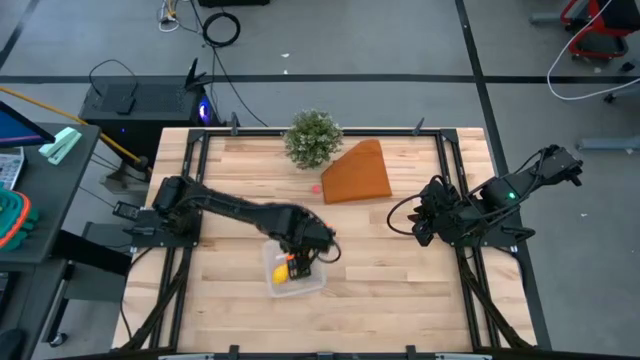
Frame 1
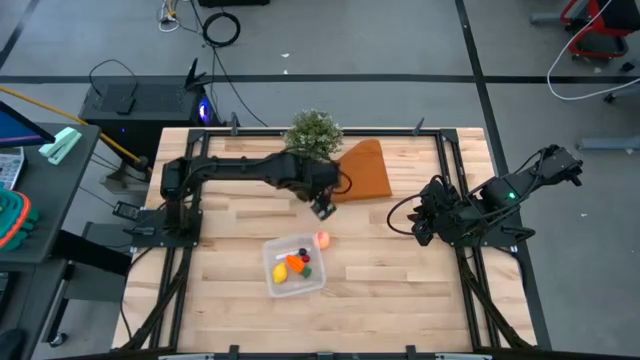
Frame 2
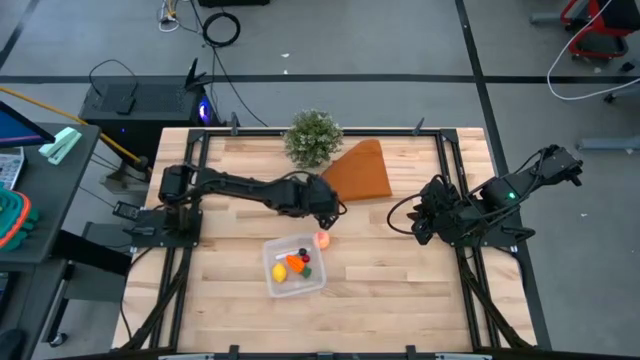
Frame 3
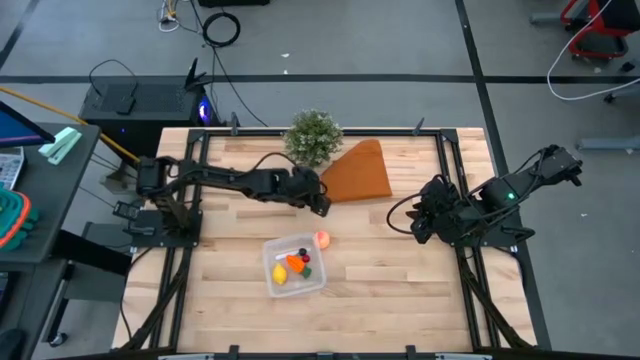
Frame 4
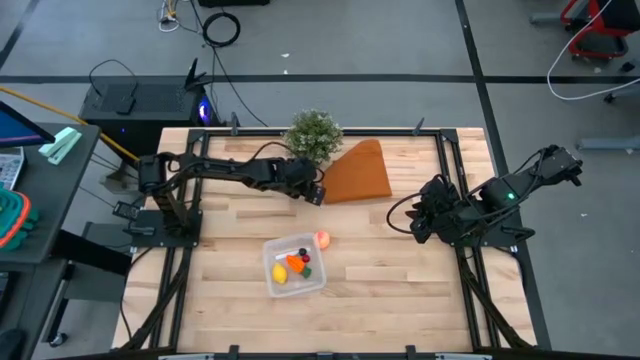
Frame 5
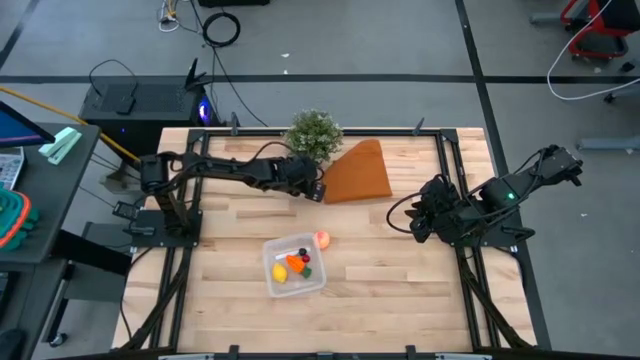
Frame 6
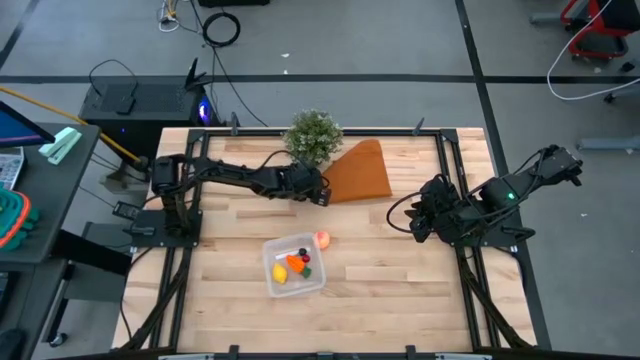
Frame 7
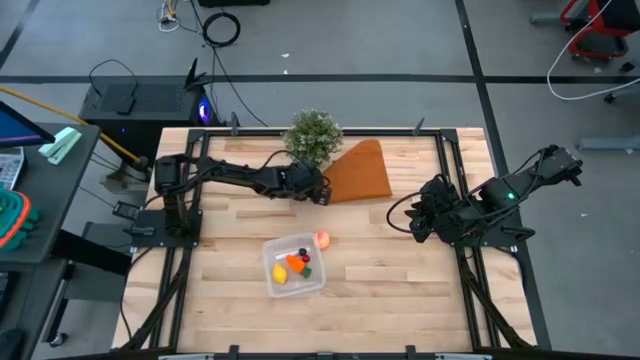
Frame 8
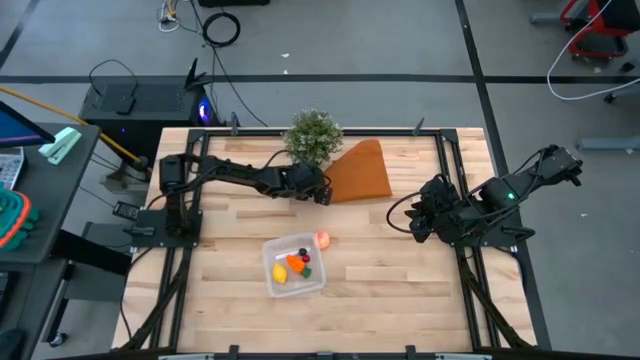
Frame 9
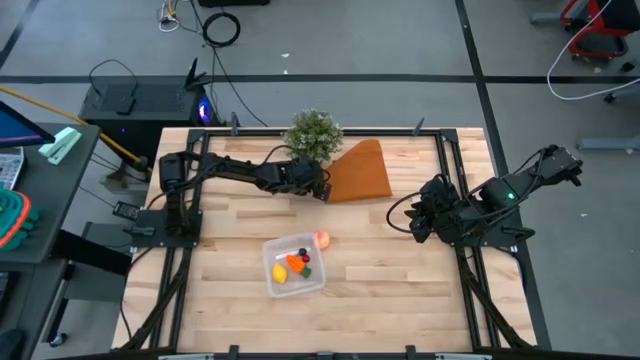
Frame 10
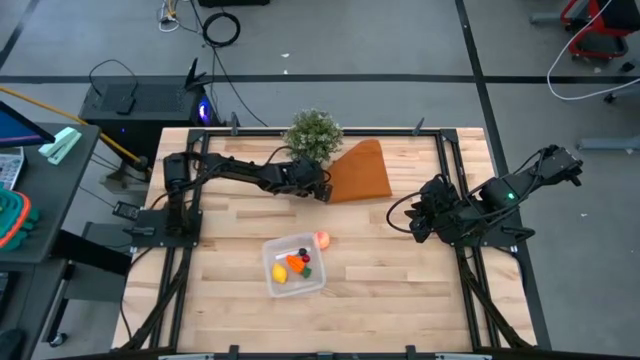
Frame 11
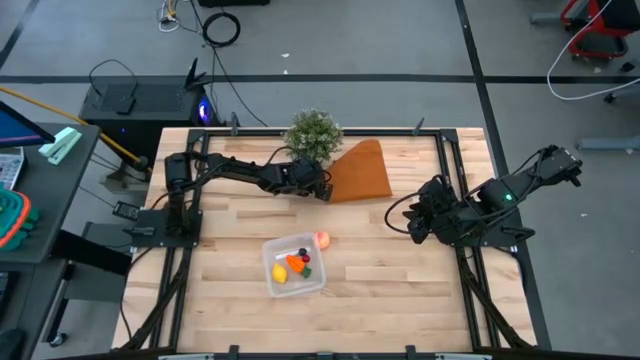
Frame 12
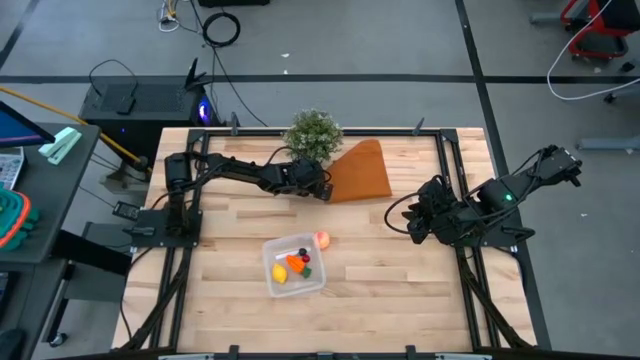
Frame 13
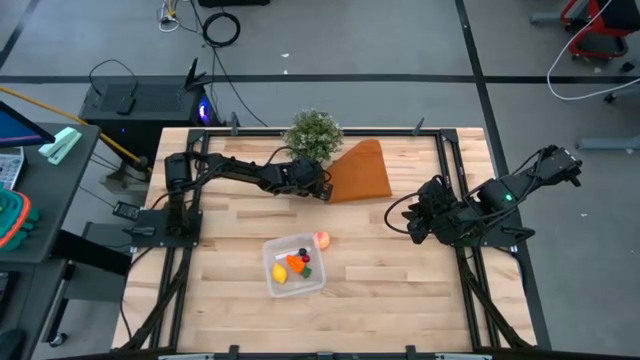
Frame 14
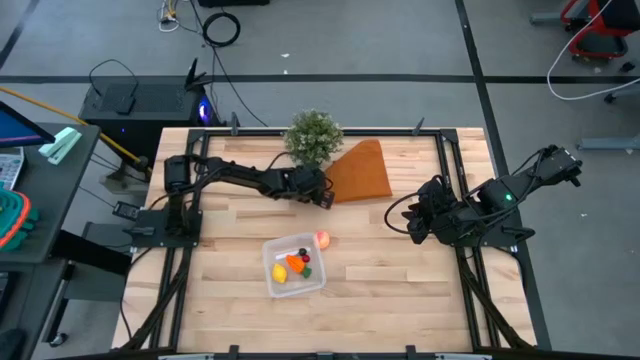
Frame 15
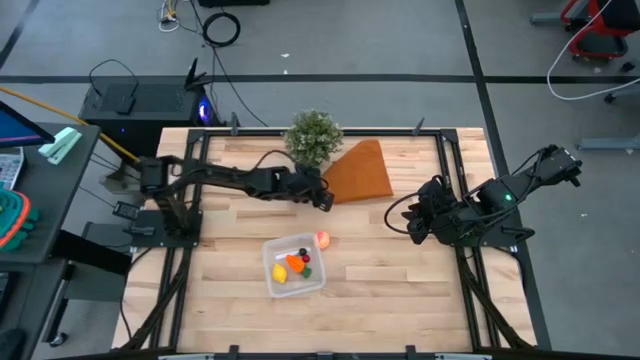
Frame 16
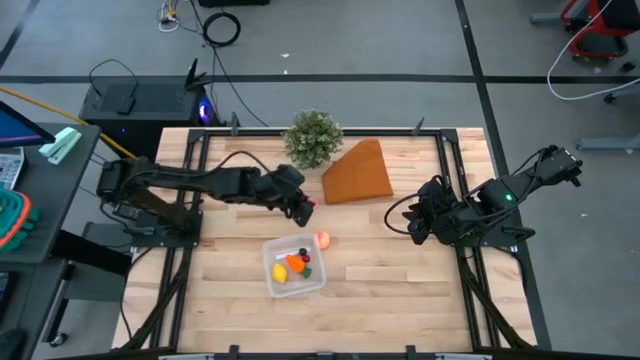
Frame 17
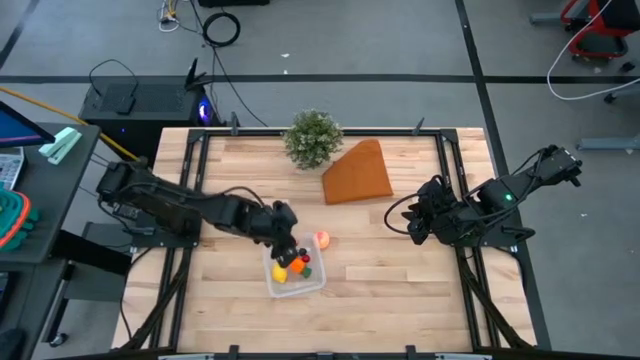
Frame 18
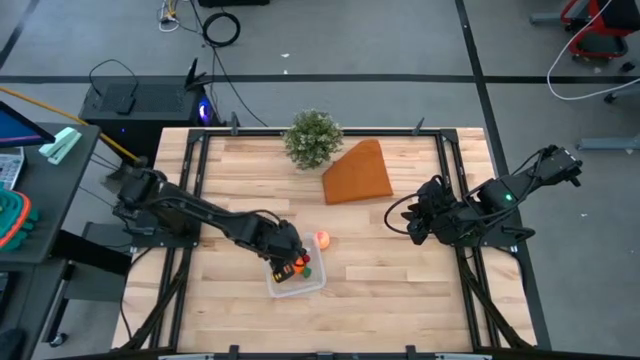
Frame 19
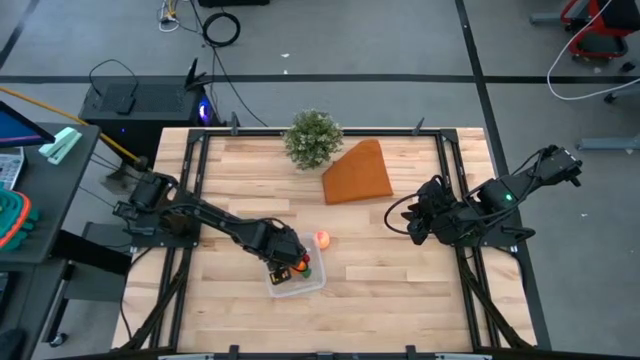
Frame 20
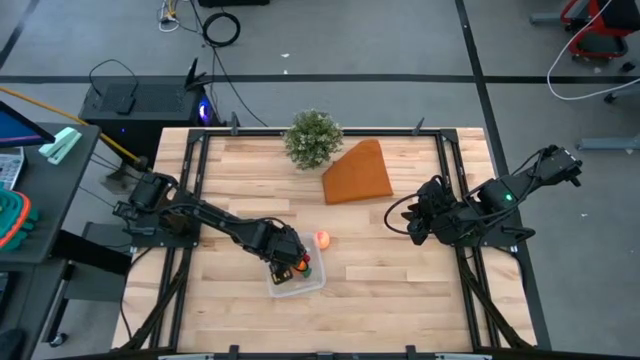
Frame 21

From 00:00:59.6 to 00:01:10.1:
Task: Pick and placing Produce into tupperware
Put the small pink peach into the transparent bin

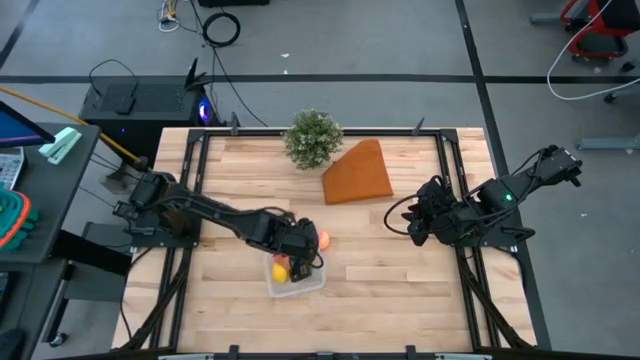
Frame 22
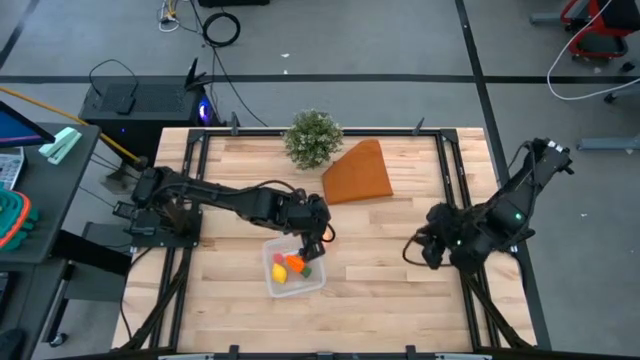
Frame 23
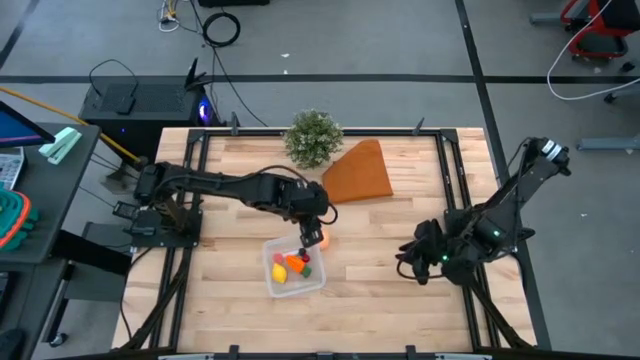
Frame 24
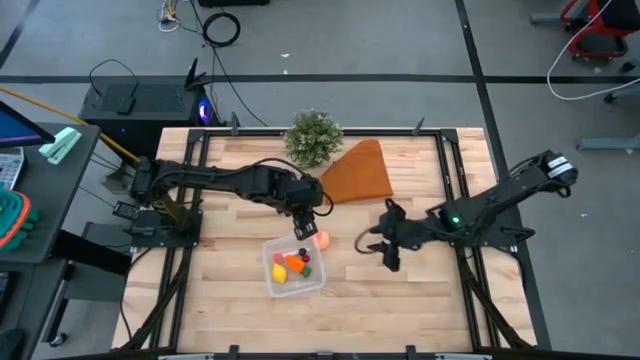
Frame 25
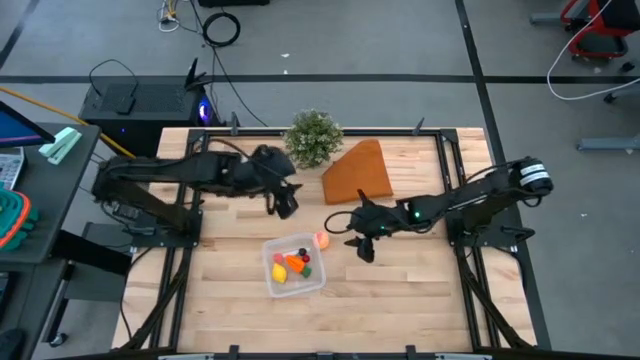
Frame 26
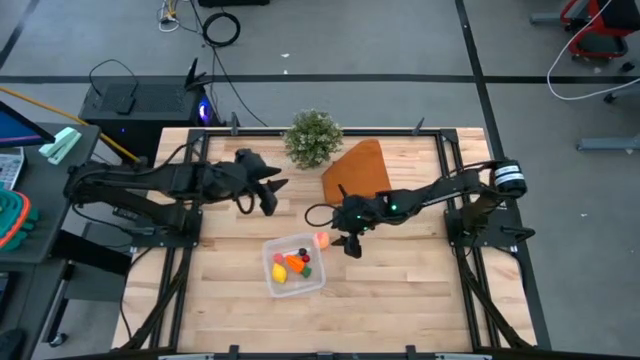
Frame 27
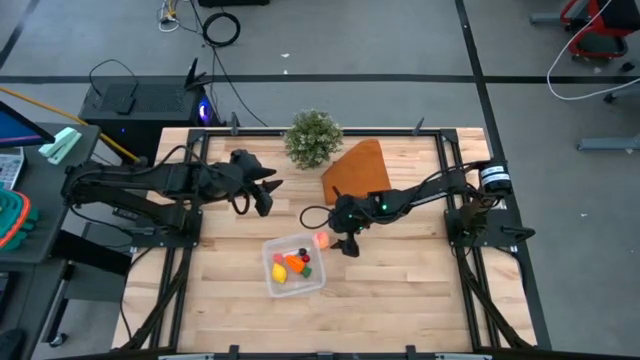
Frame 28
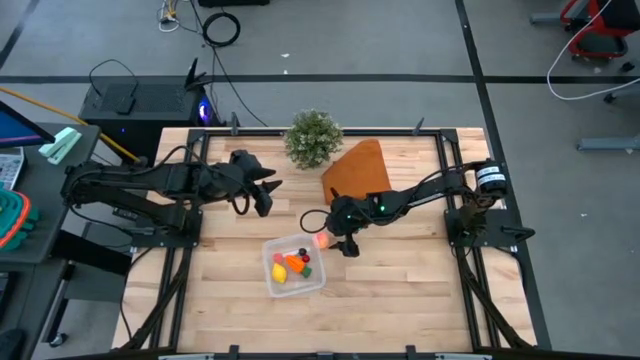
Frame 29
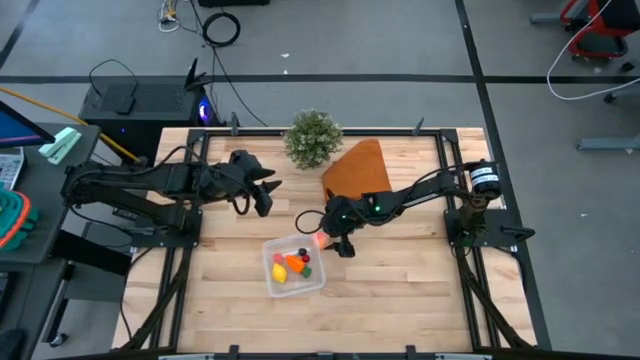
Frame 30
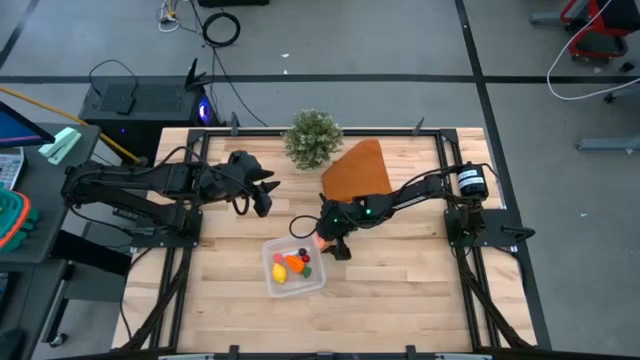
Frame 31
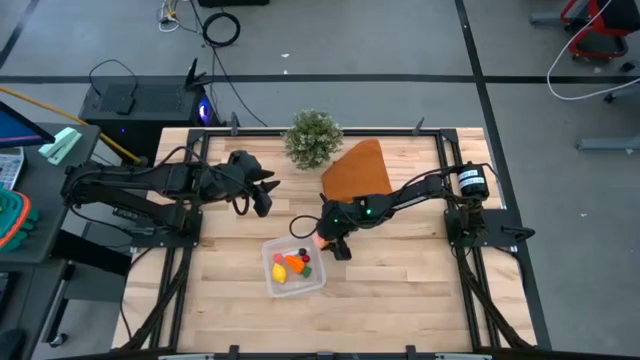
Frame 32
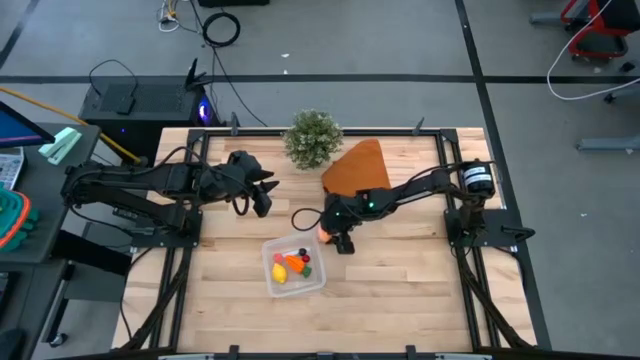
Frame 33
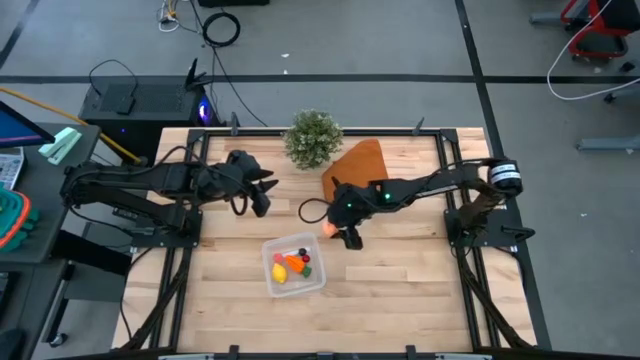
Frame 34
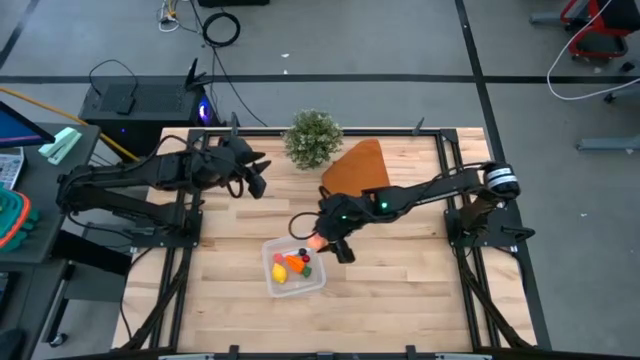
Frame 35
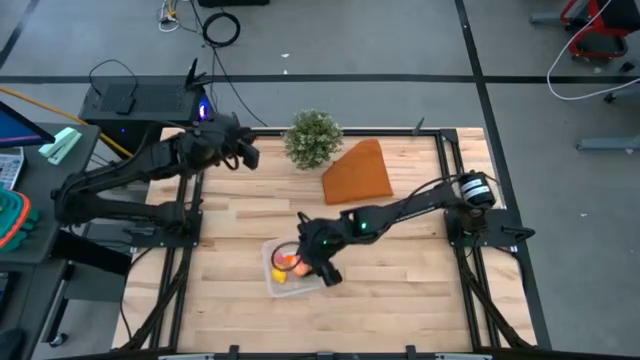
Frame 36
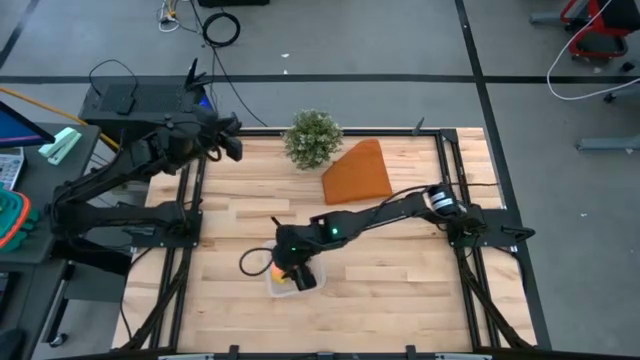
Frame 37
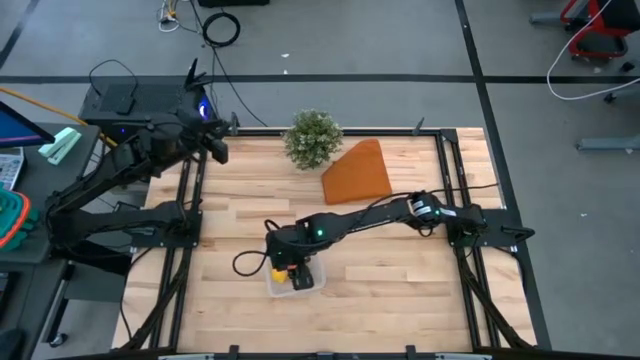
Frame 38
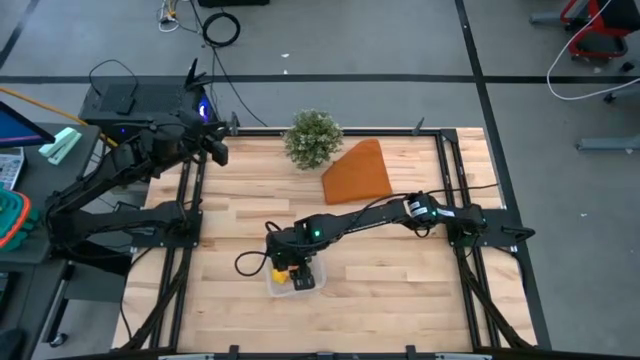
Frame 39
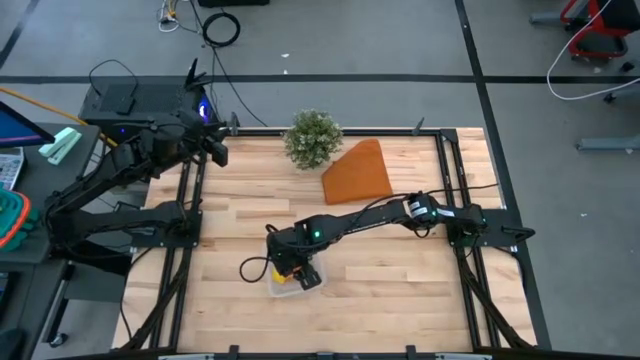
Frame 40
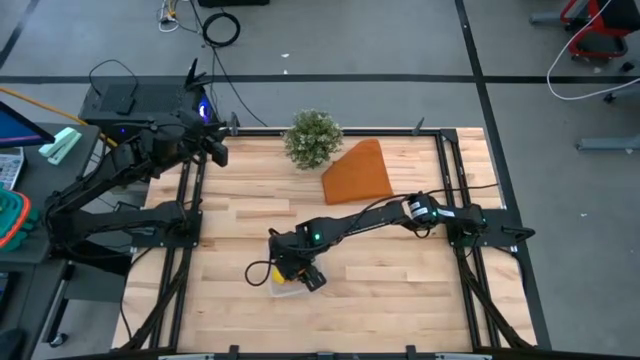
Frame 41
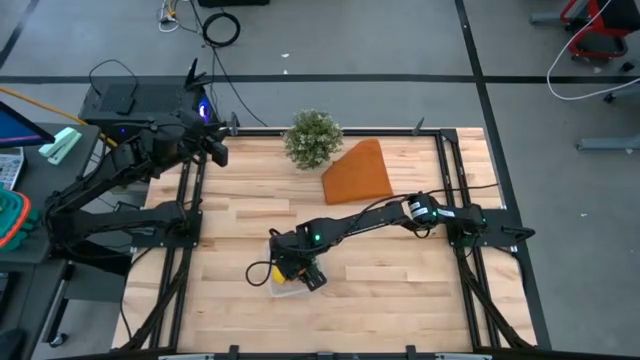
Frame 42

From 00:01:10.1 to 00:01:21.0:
Put the big peach into the transparent bin
